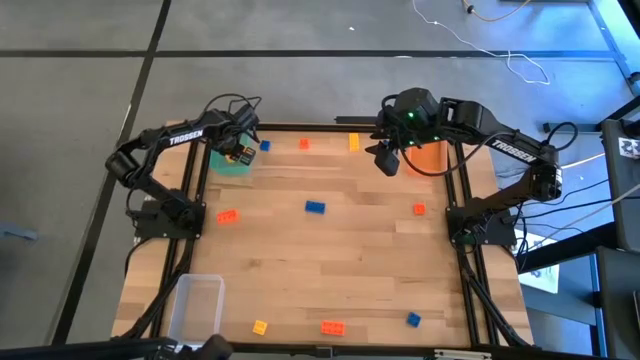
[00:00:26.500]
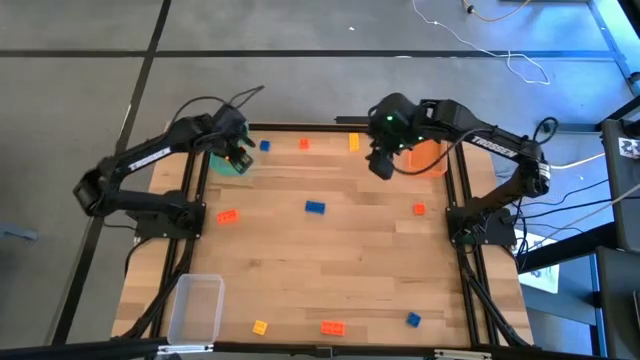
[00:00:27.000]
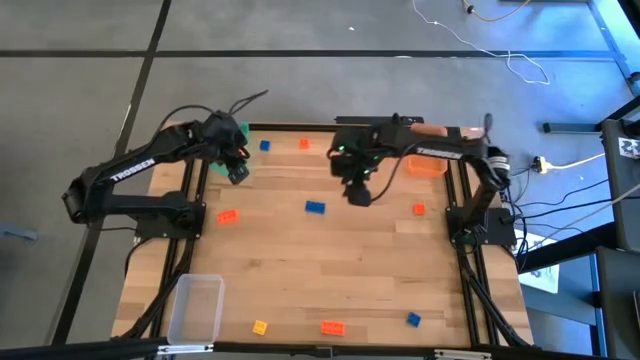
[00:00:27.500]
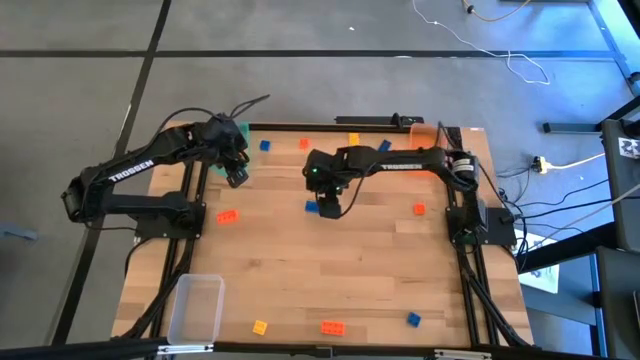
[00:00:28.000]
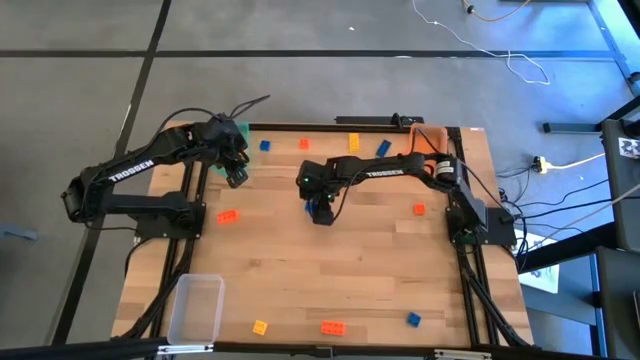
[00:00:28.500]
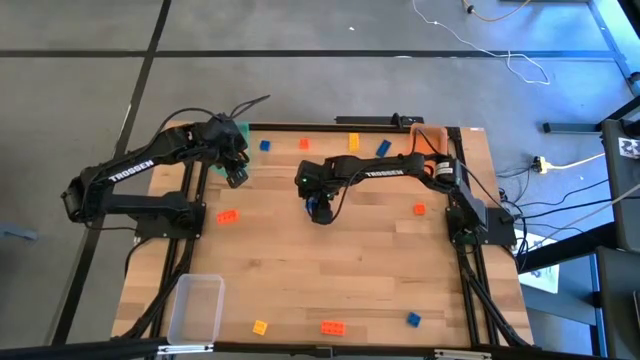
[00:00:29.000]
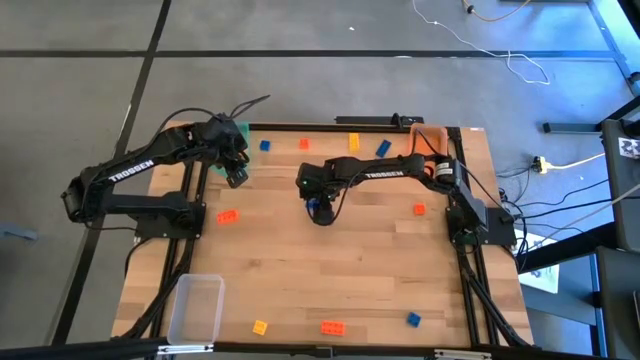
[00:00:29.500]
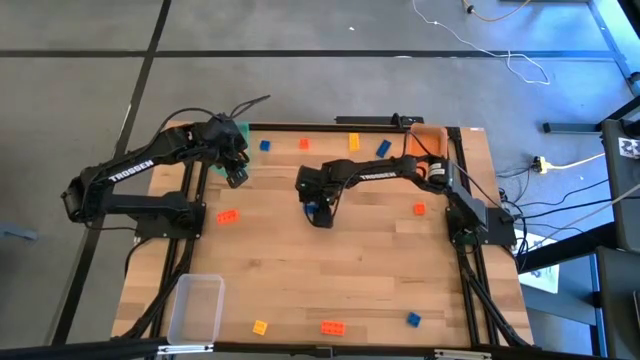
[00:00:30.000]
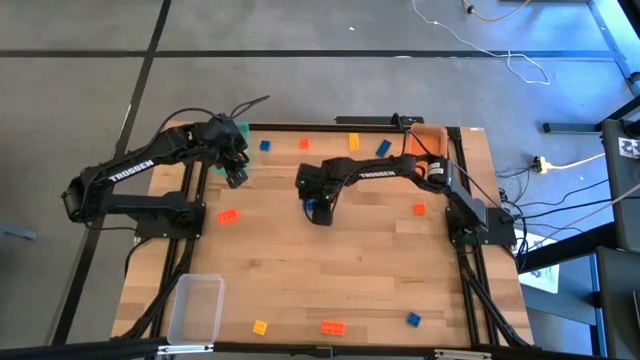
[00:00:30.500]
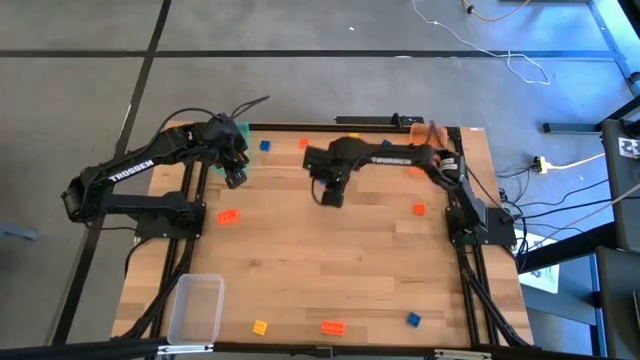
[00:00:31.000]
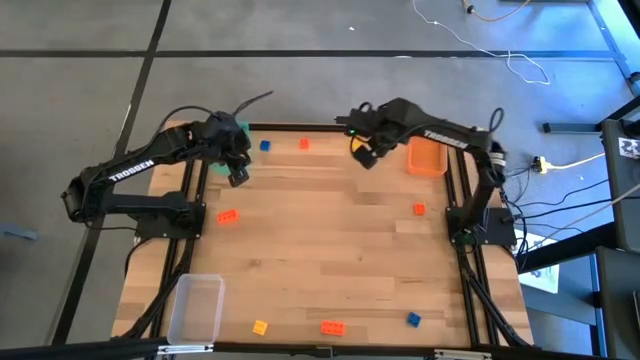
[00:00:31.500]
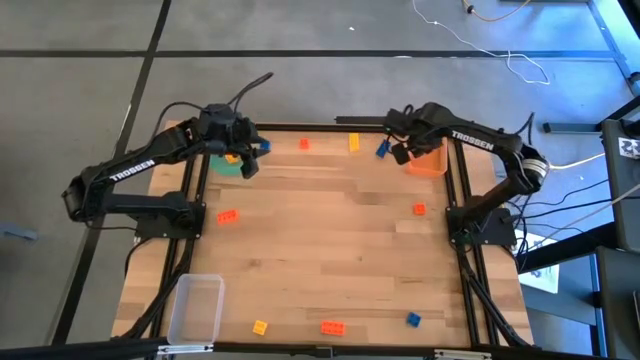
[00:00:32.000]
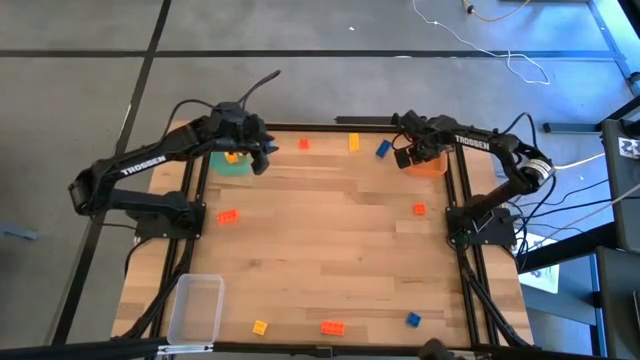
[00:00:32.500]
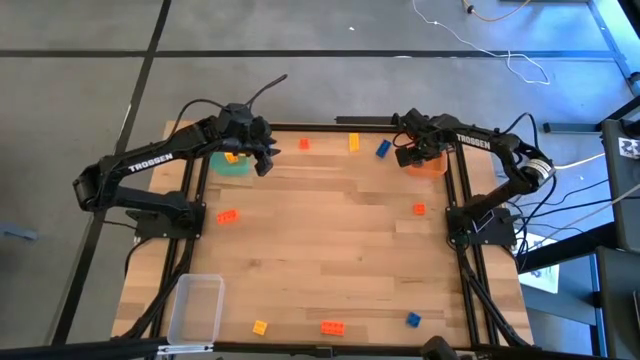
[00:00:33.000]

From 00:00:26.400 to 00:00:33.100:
Task: Sort & place blocks by color
Put the blue game piece into the orange bin

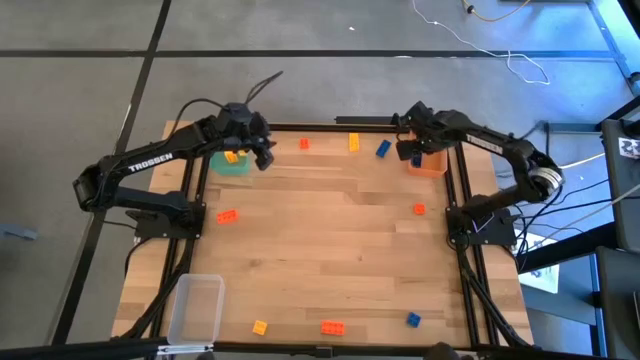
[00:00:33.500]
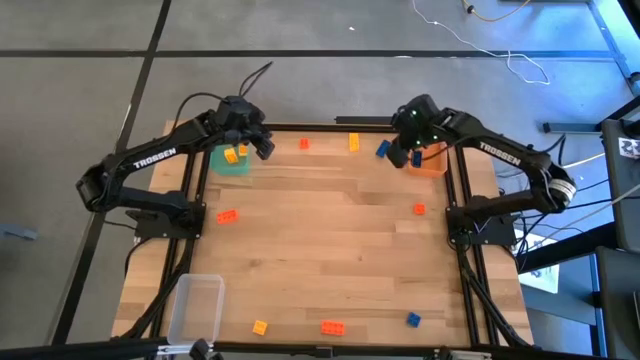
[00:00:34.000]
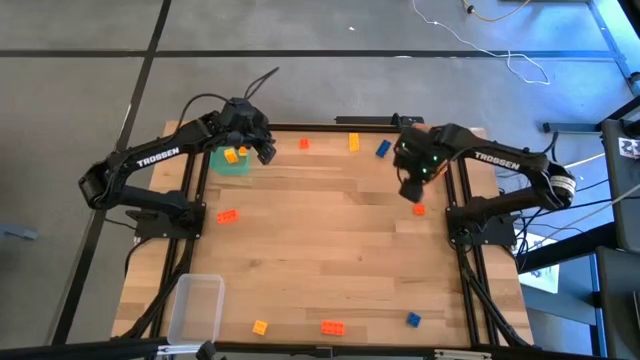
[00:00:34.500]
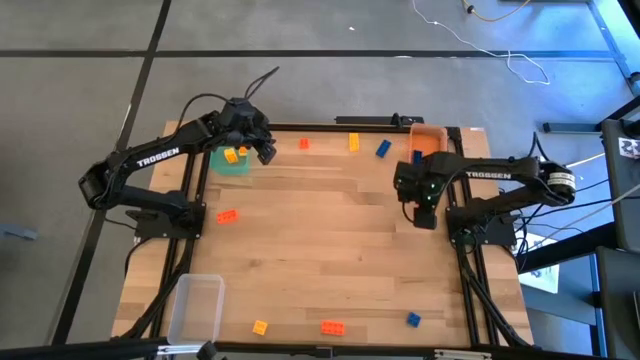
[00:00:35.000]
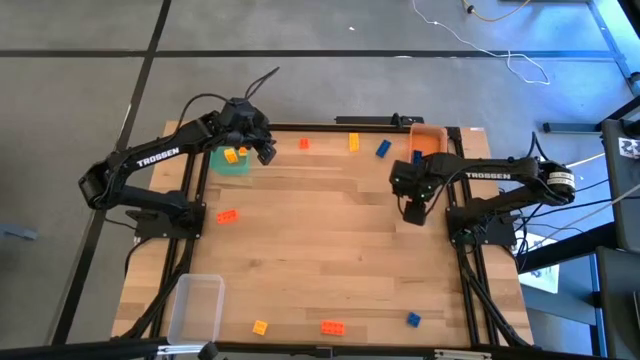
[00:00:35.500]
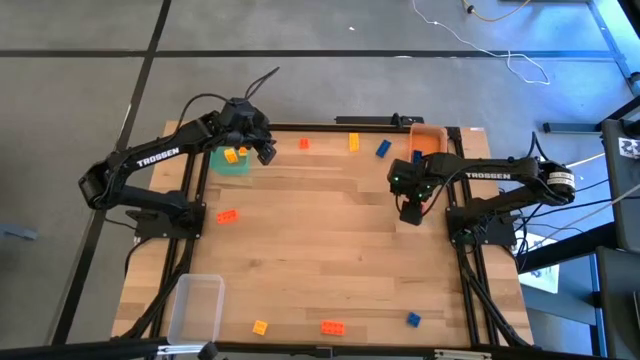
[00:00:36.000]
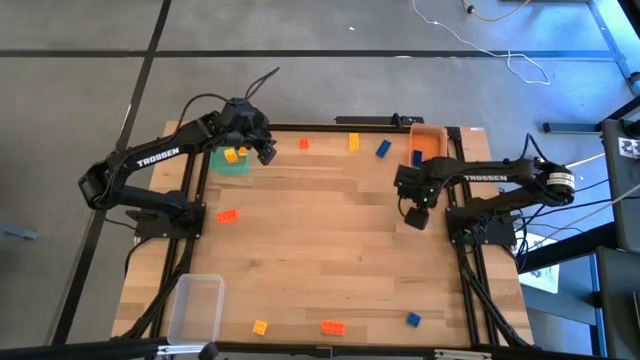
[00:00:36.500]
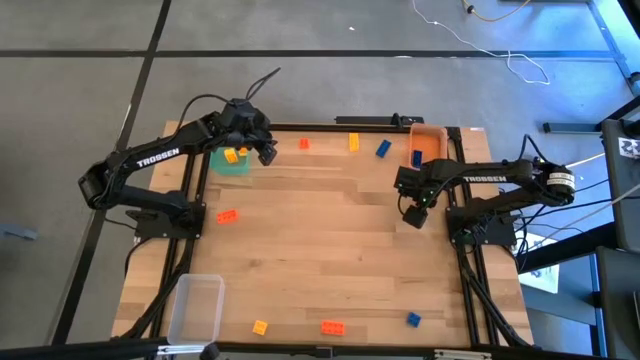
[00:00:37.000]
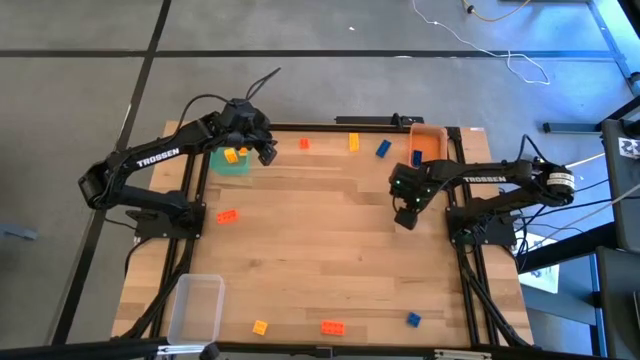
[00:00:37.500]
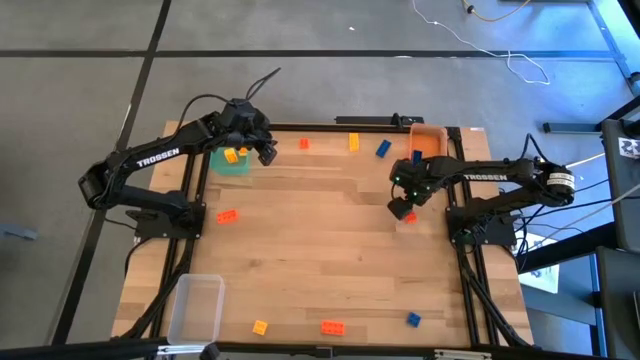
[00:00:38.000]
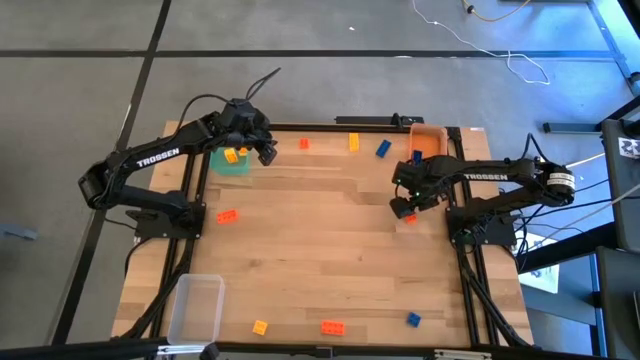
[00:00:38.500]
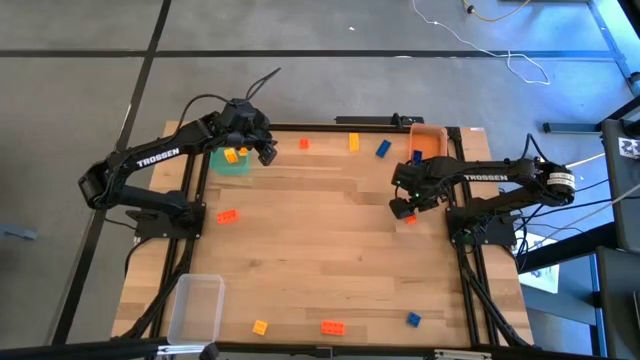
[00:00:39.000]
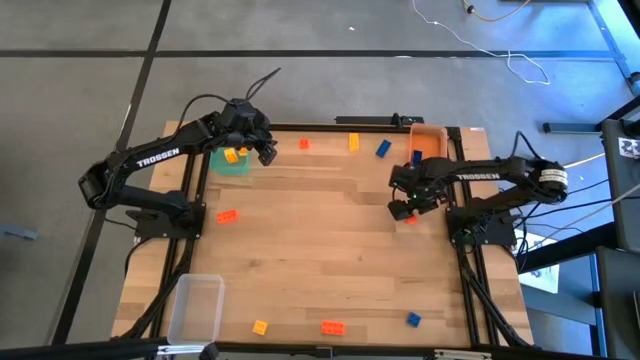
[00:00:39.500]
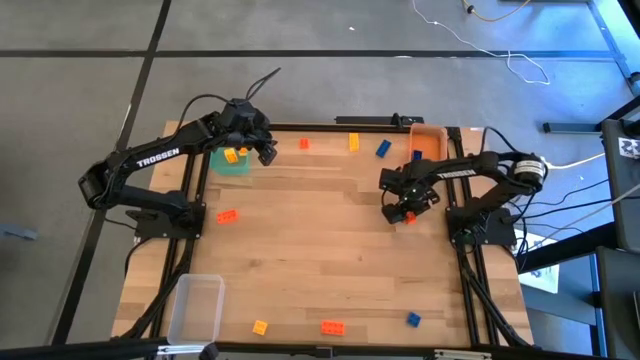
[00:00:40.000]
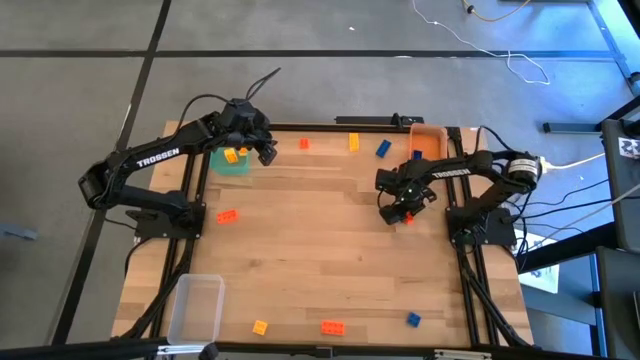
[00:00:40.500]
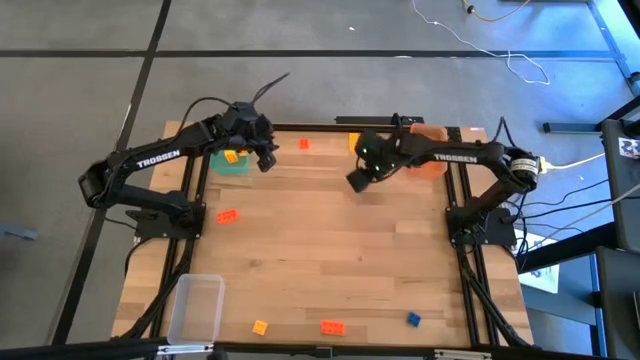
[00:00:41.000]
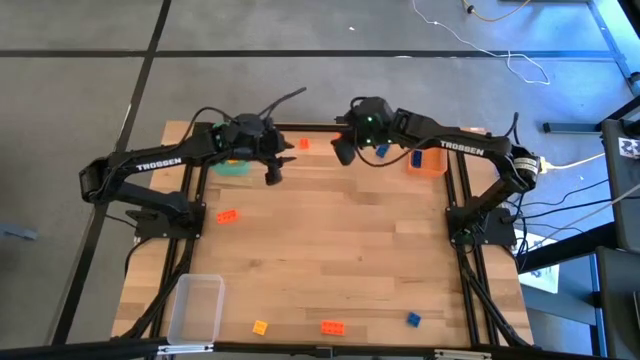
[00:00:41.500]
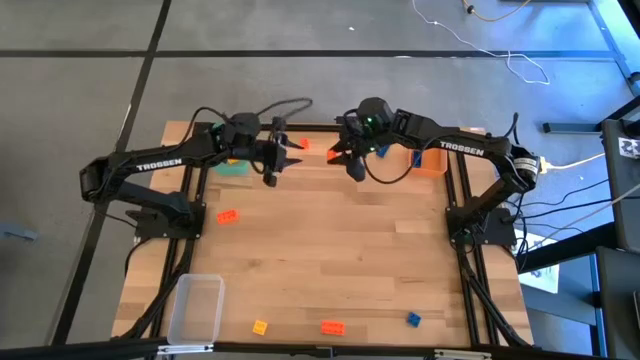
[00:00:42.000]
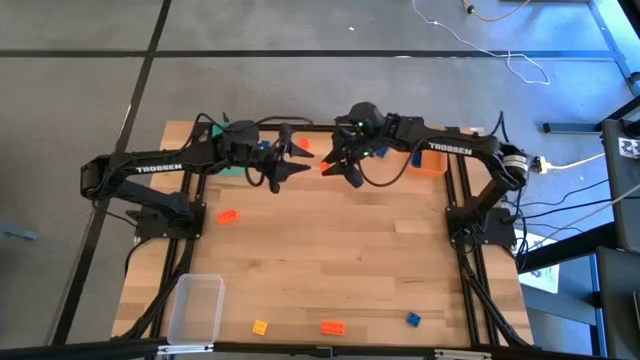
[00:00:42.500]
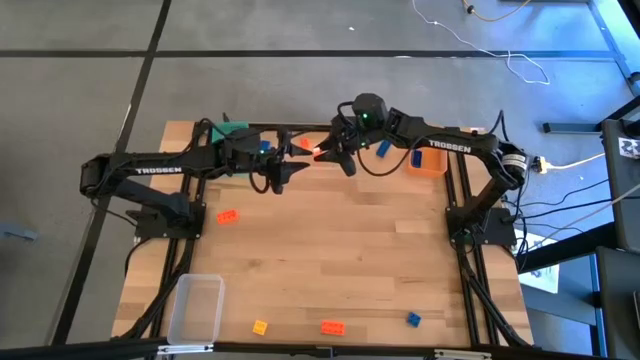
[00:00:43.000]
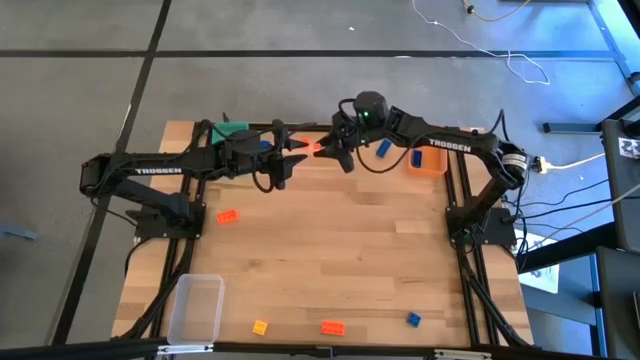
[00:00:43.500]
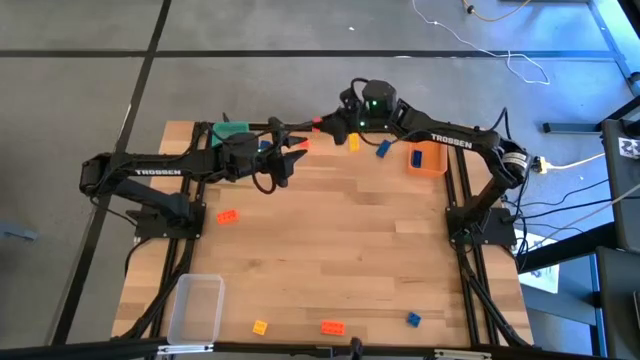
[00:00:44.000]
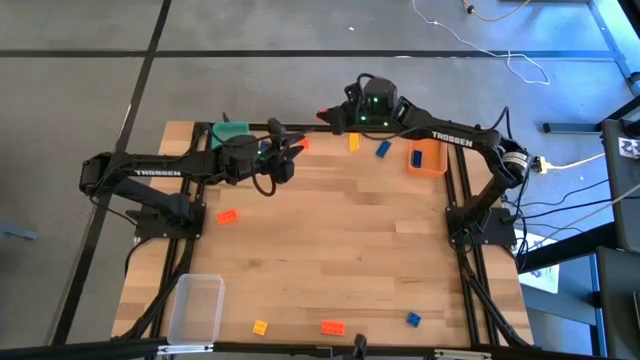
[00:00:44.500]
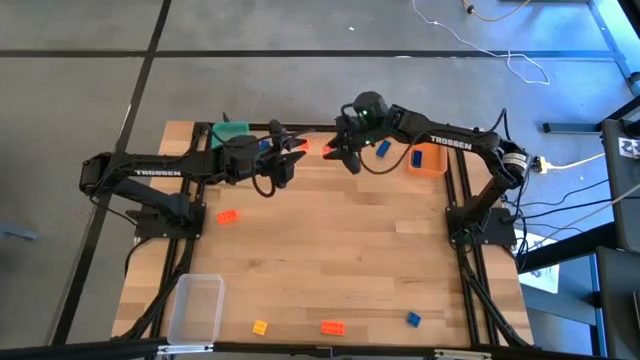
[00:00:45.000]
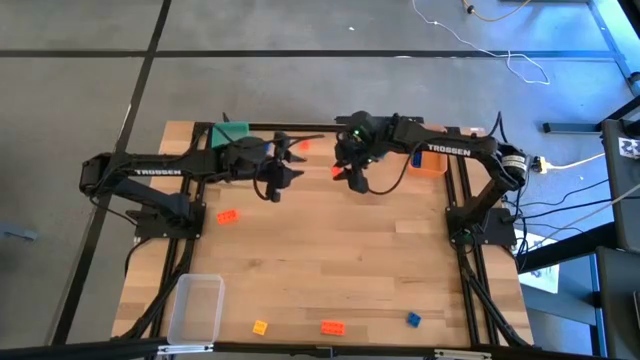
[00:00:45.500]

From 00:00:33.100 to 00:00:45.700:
Put the orange game piece into the transparent bin

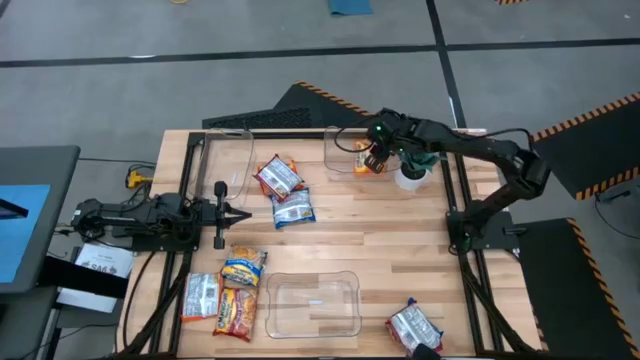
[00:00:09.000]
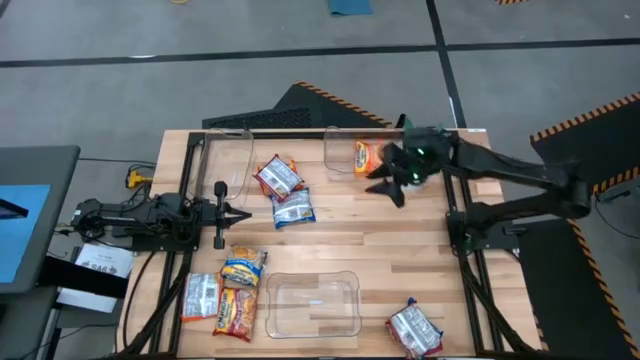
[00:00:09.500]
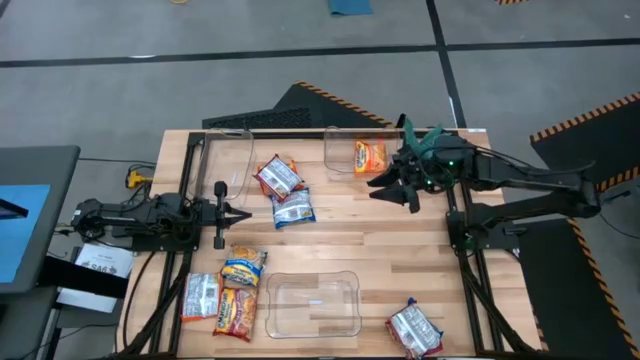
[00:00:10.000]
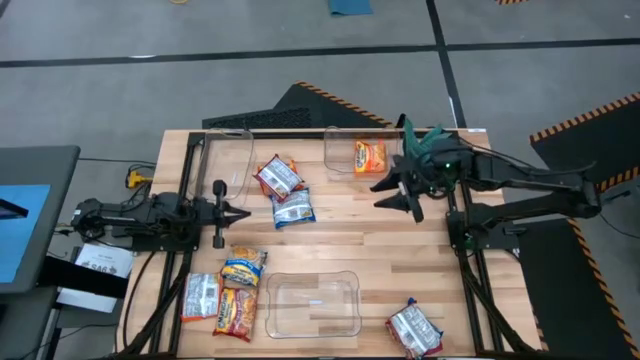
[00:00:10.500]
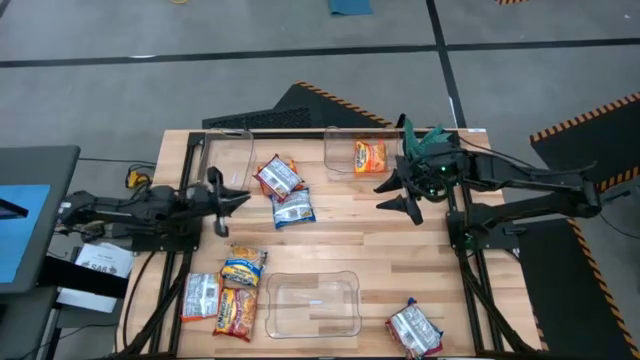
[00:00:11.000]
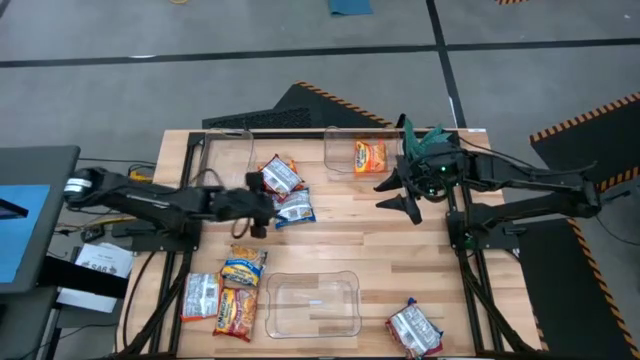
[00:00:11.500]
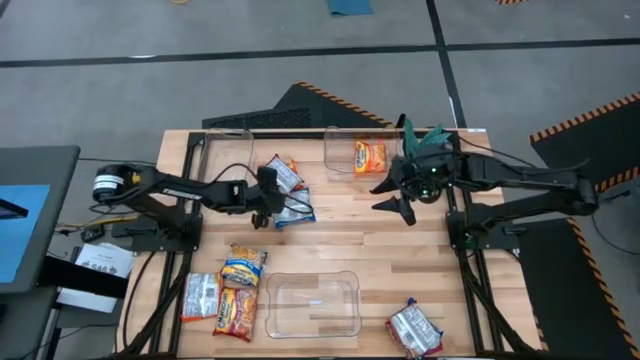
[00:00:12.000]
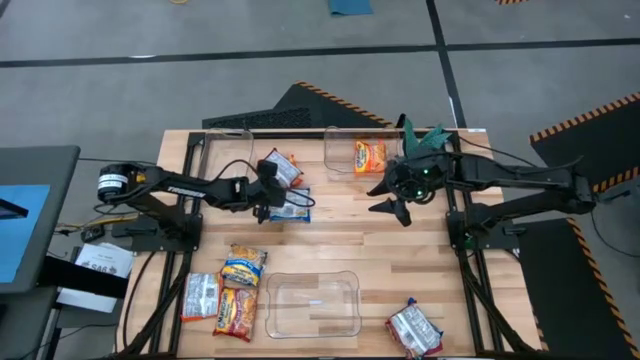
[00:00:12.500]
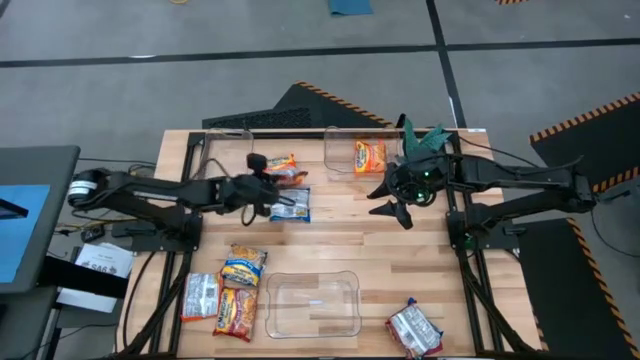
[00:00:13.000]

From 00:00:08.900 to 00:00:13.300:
Task: Sort Maruchan noodles
Put the top red noodle pack into the top left transparent bin
